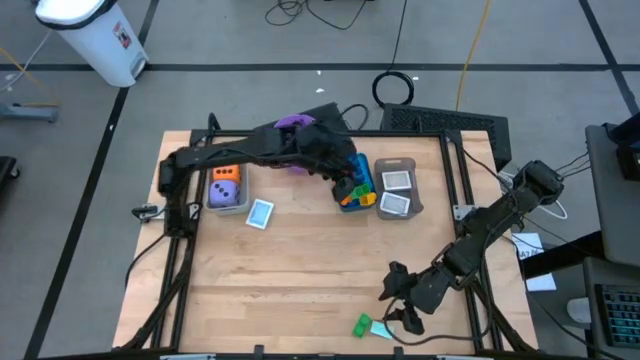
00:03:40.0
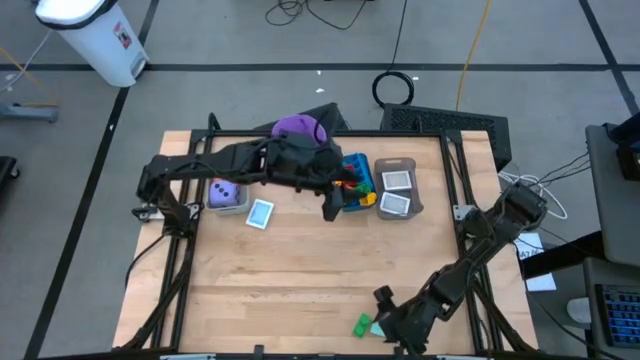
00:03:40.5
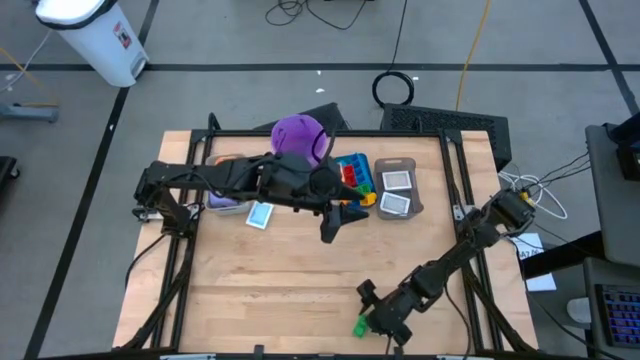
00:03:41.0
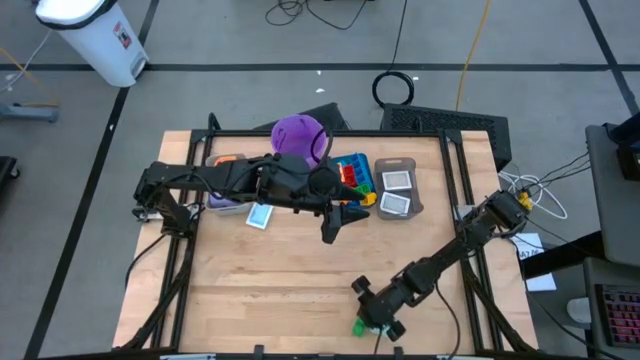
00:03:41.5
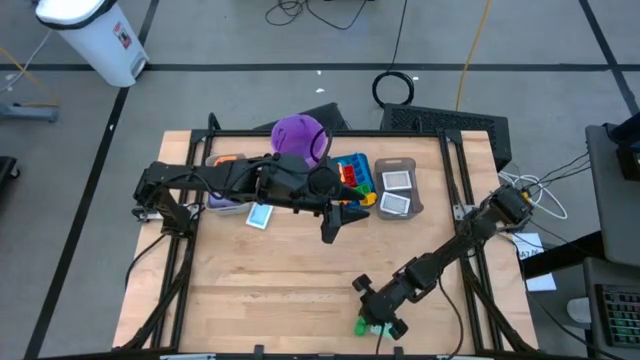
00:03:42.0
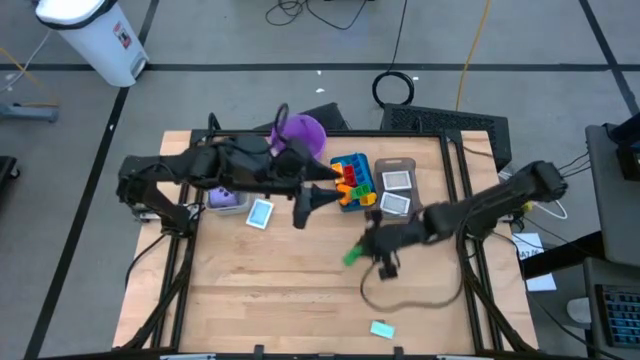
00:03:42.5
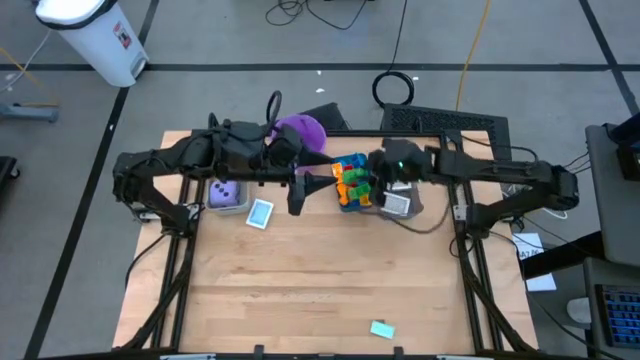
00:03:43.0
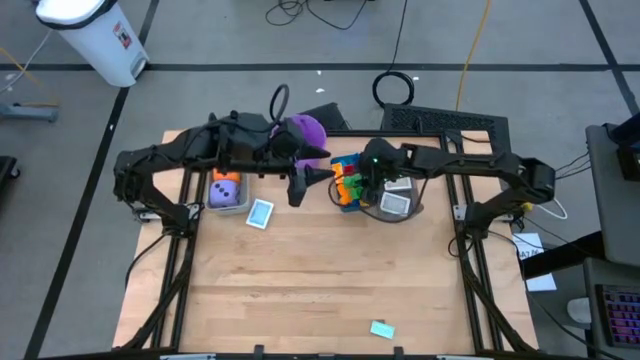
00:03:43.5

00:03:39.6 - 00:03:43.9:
Task: Pick & Place Toys
Put the green game piece into the blue bin

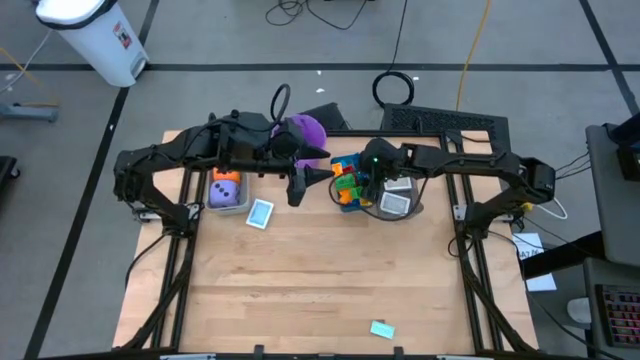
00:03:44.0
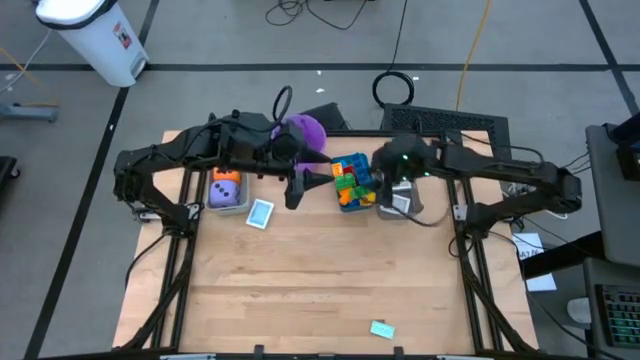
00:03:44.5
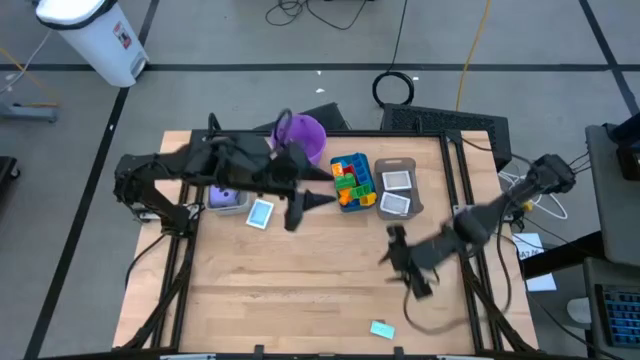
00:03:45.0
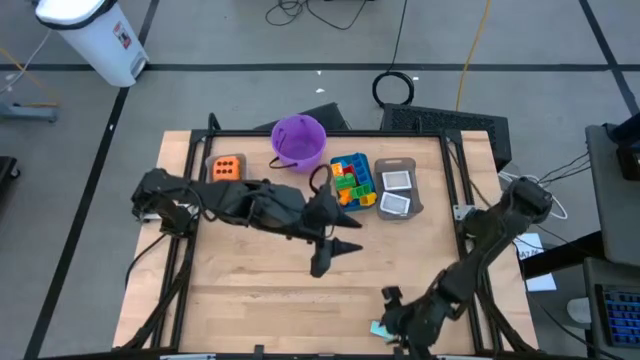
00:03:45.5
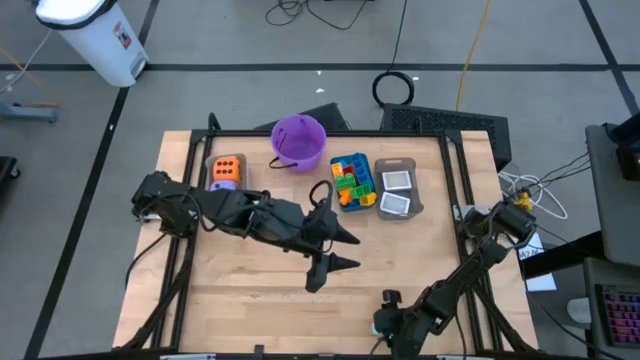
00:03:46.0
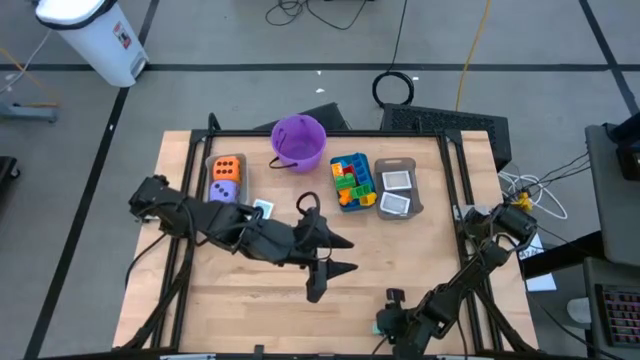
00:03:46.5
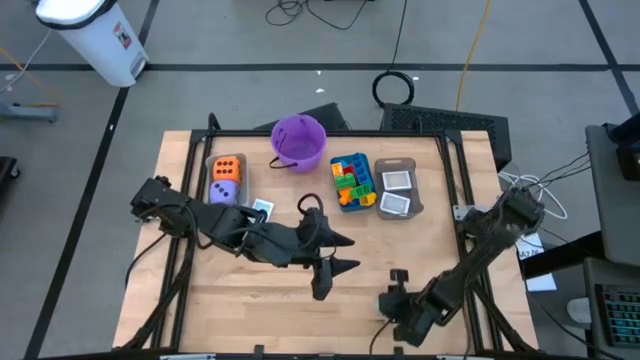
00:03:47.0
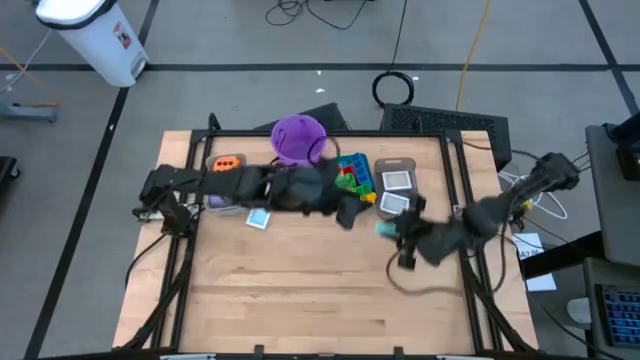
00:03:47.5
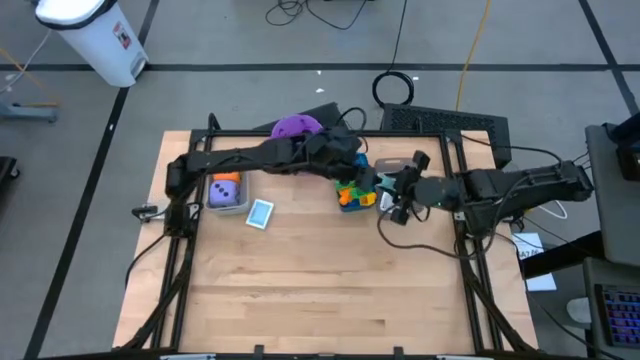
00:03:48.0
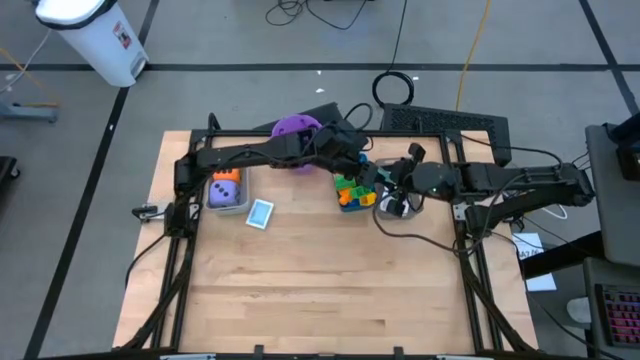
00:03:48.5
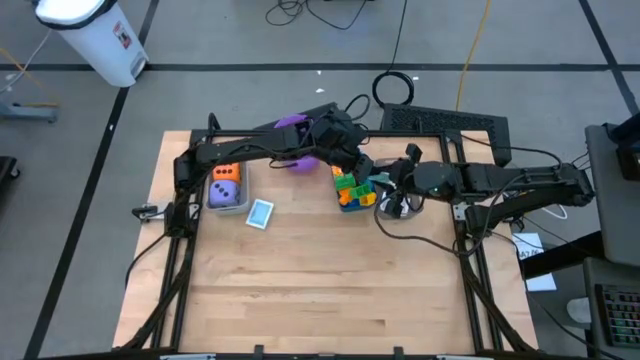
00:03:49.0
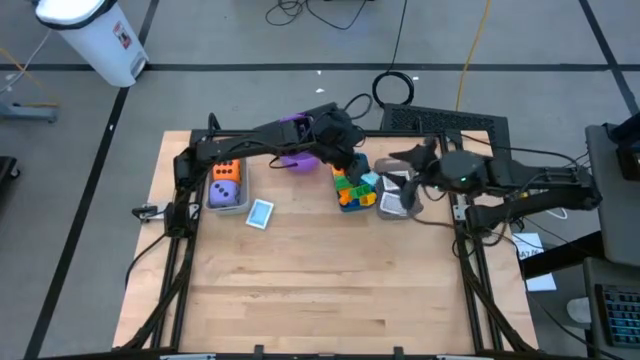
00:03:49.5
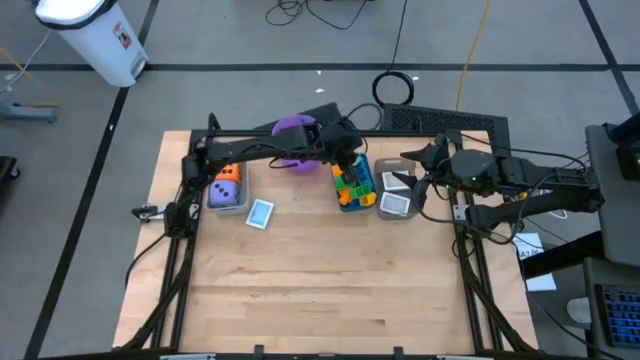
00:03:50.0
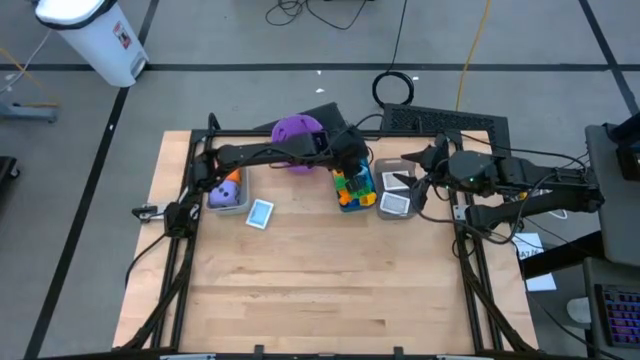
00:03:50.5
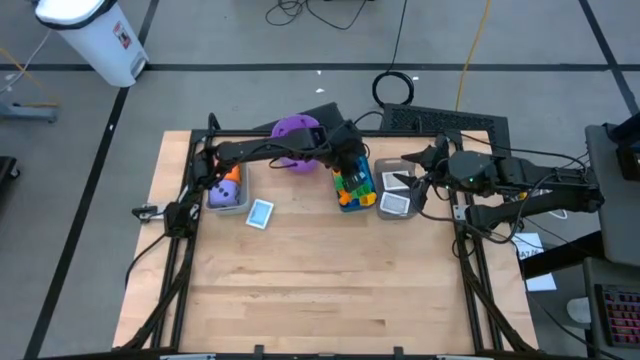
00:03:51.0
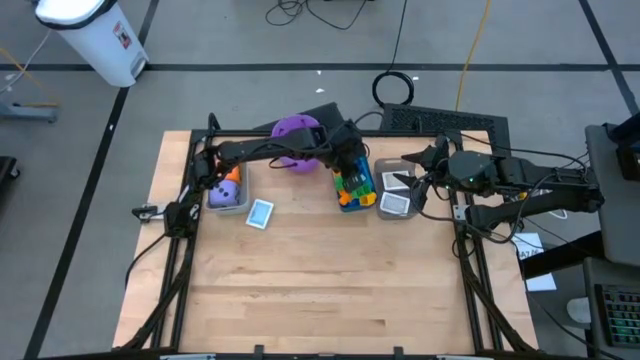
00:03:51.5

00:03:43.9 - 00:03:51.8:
Put the light blue game piece into the blue bin

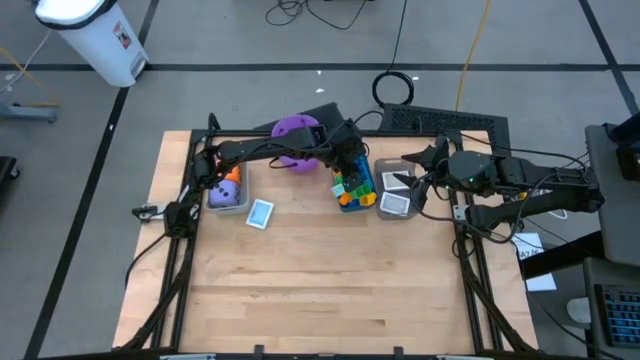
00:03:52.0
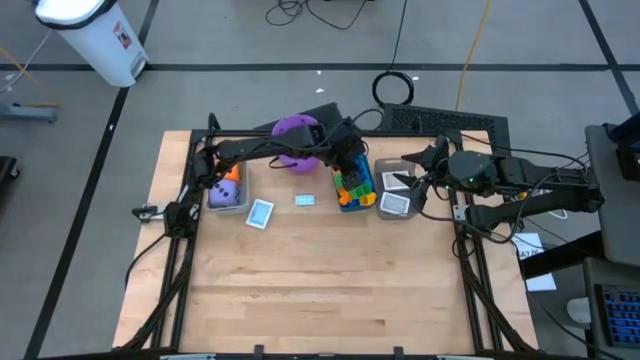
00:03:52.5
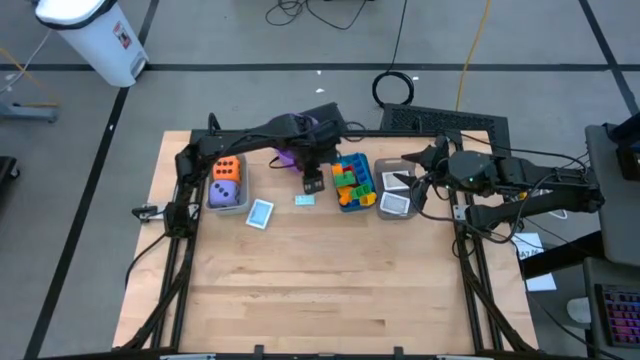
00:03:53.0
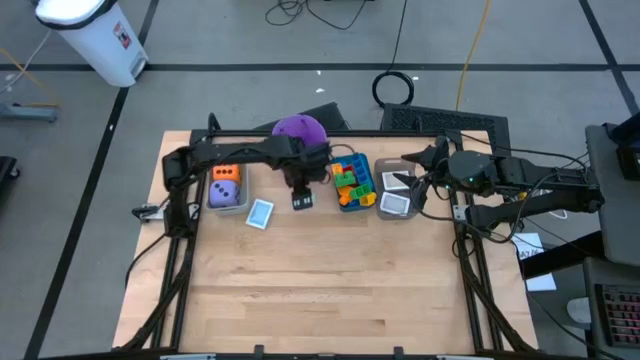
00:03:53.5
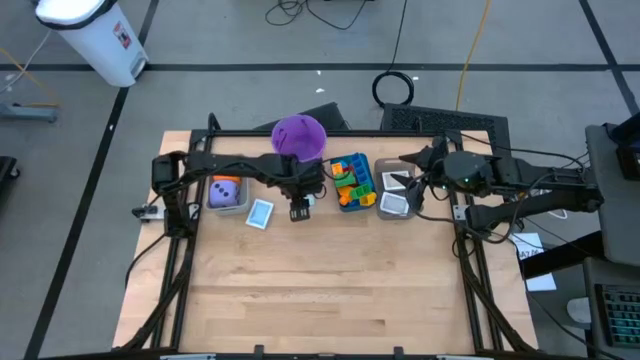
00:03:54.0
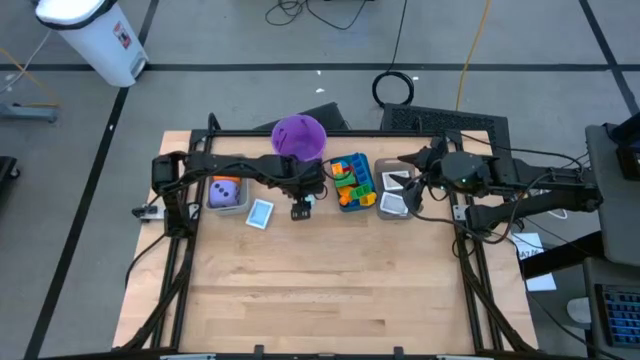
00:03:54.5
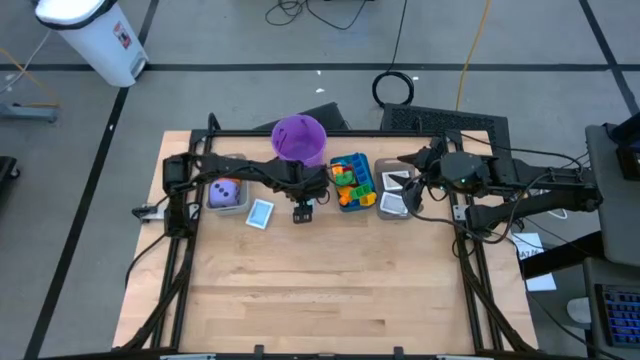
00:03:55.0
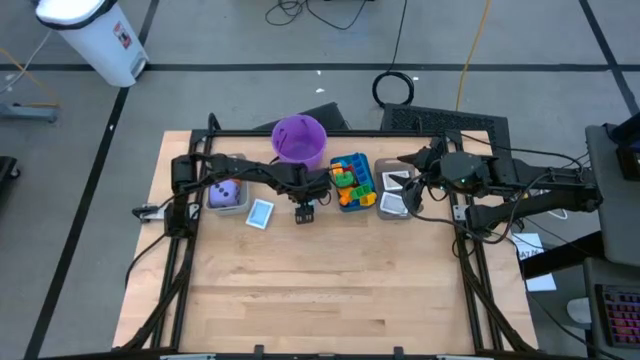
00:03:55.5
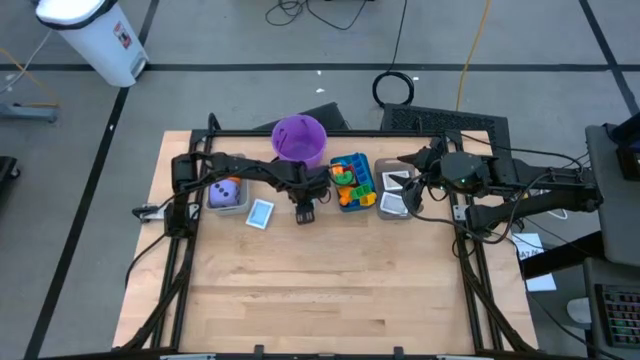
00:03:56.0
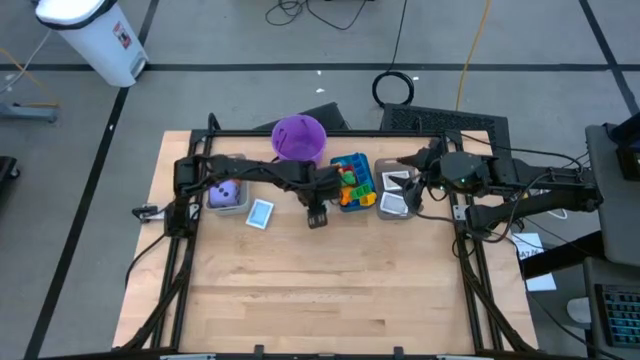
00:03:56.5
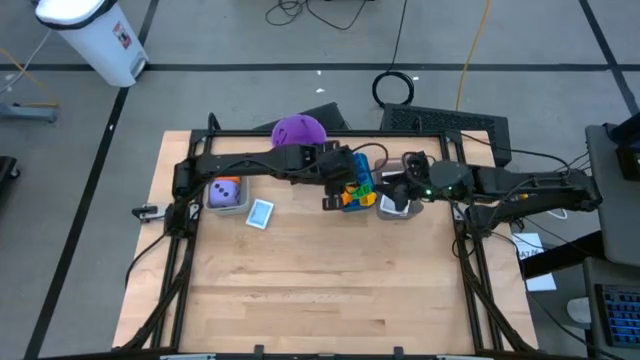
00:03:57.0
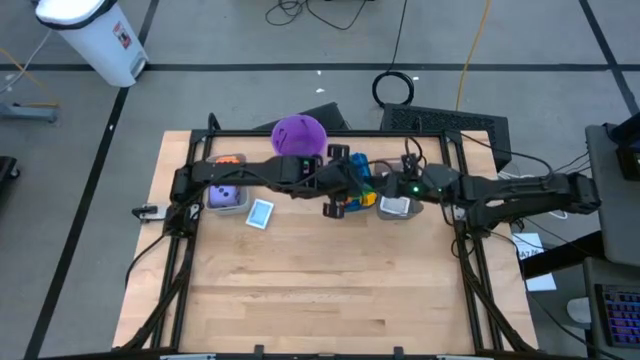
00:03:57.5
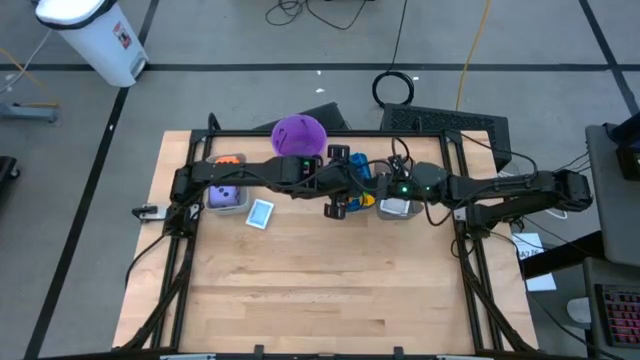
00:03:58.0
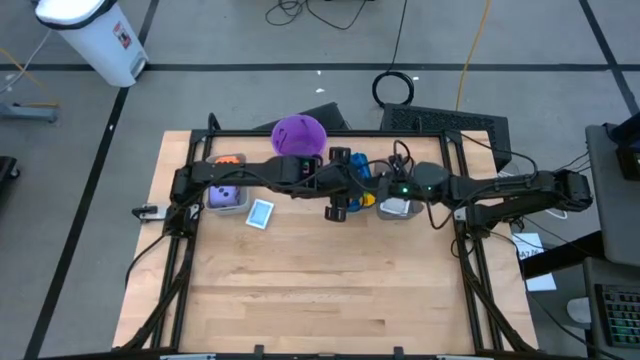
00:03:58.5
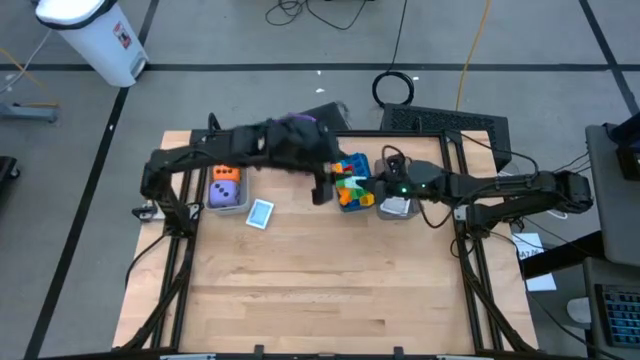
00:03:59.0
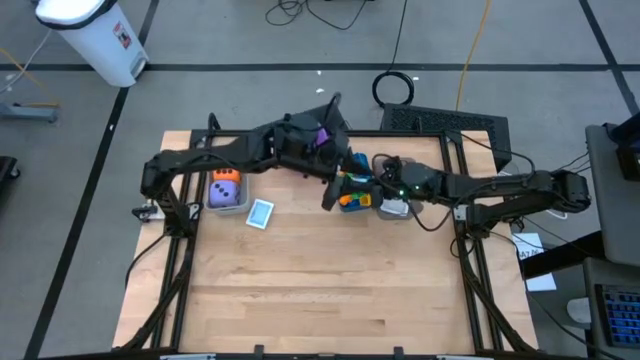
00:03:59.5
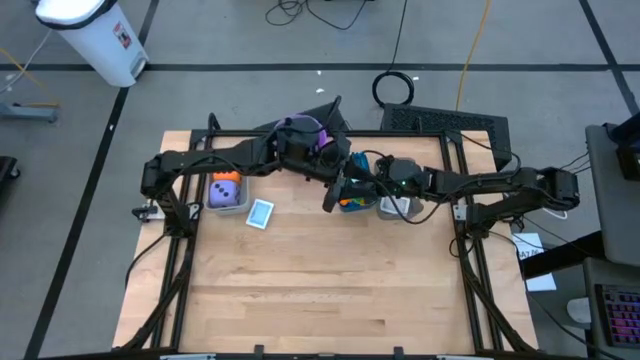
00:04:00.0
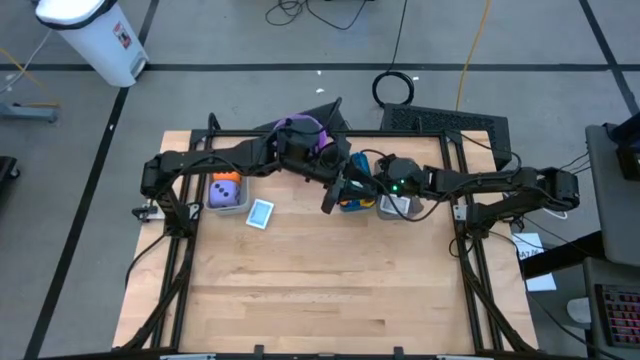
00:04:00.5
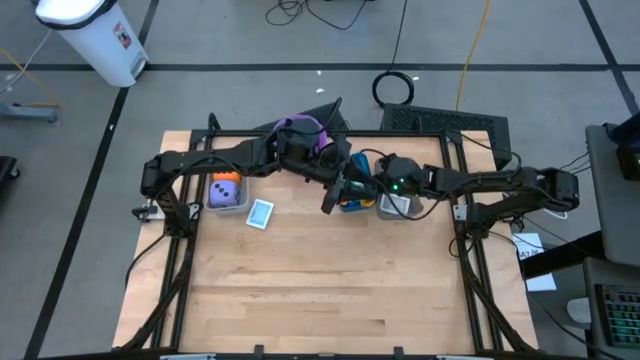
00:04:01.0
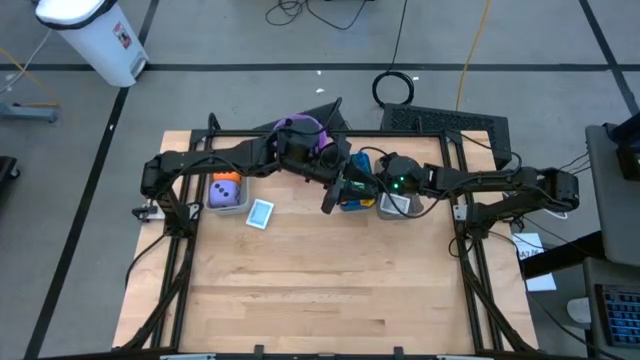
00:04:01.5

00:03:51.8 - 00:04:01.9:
Put the light blue game piece into the blue bin
